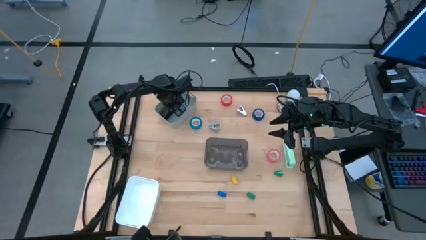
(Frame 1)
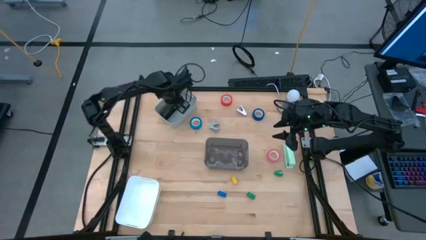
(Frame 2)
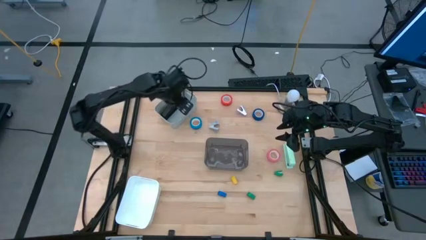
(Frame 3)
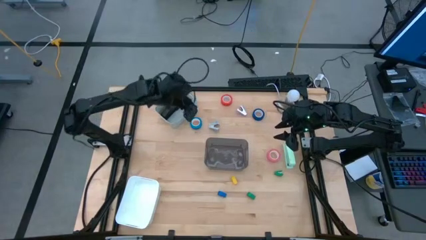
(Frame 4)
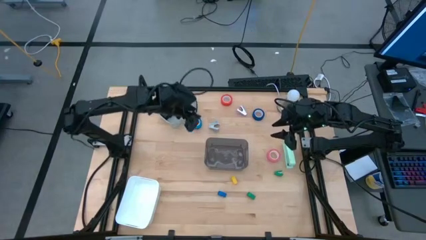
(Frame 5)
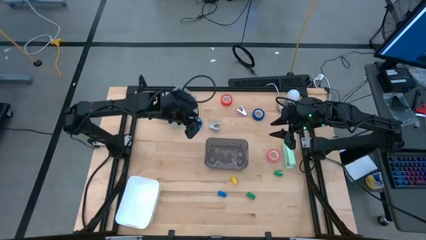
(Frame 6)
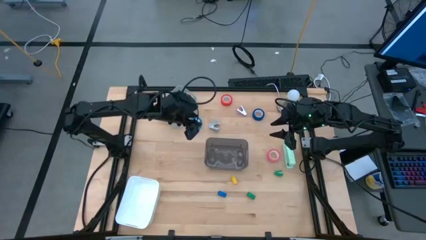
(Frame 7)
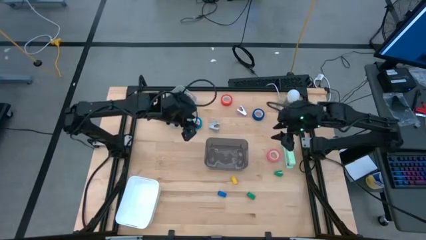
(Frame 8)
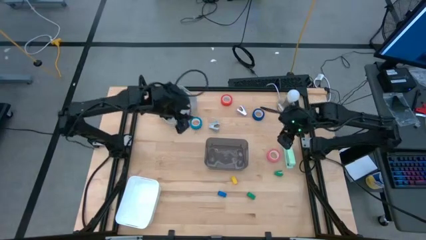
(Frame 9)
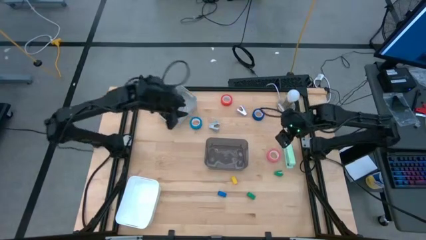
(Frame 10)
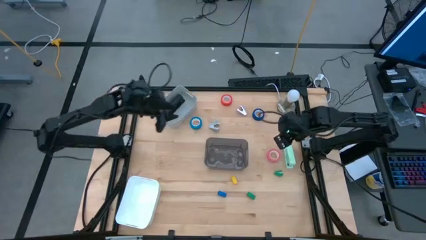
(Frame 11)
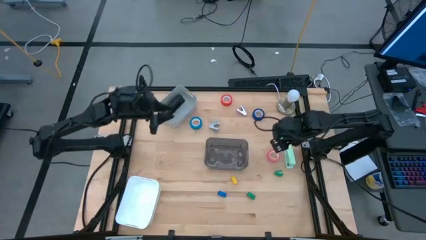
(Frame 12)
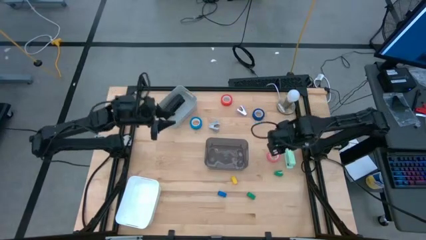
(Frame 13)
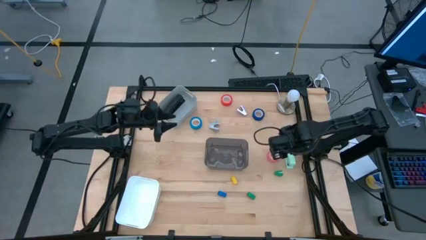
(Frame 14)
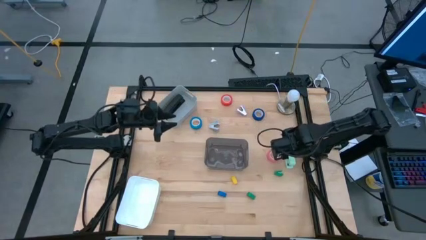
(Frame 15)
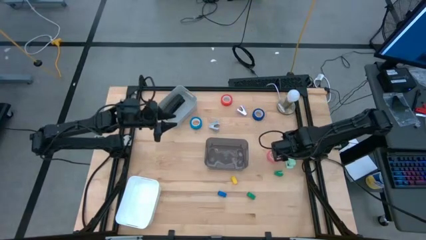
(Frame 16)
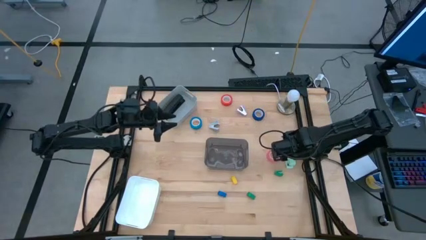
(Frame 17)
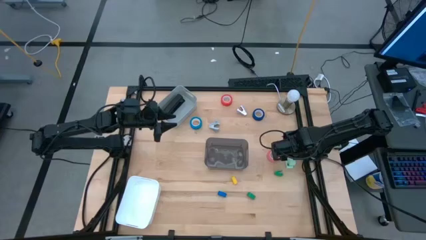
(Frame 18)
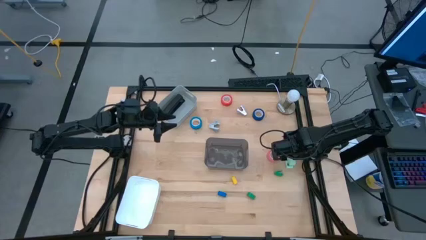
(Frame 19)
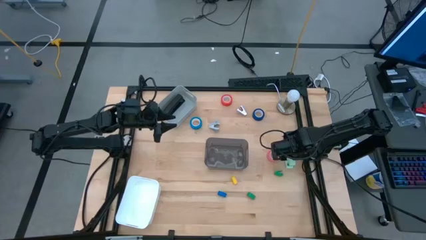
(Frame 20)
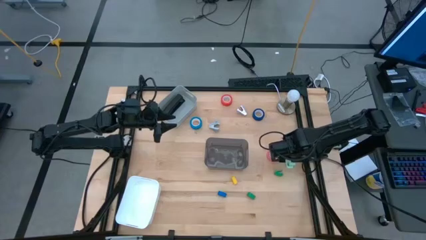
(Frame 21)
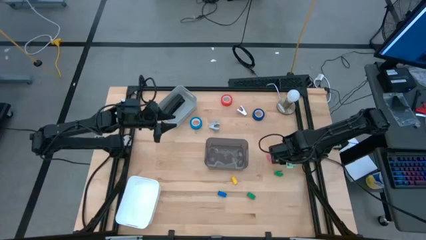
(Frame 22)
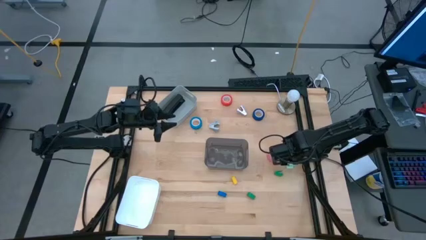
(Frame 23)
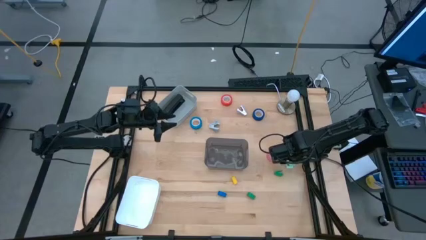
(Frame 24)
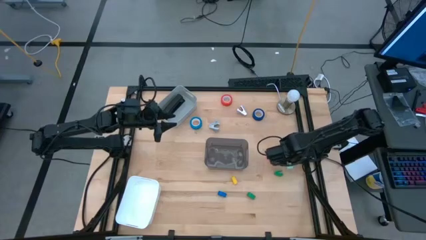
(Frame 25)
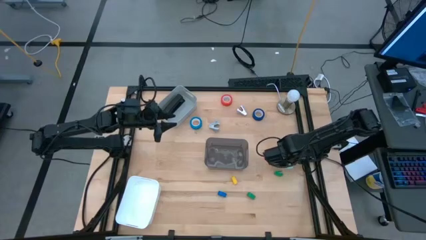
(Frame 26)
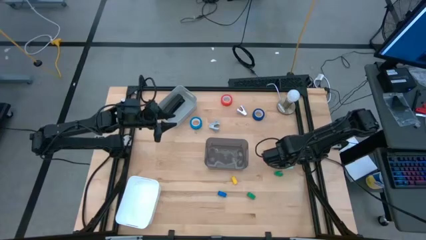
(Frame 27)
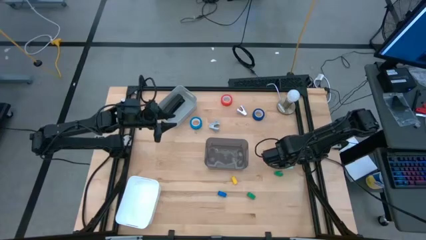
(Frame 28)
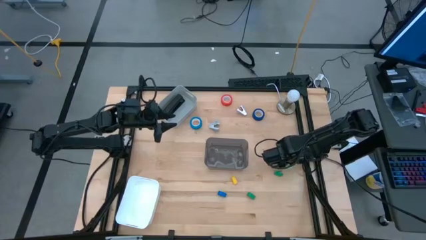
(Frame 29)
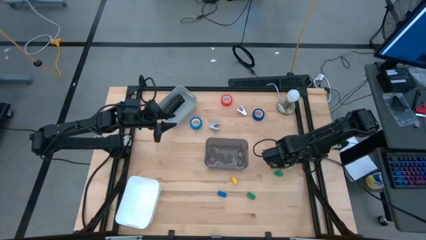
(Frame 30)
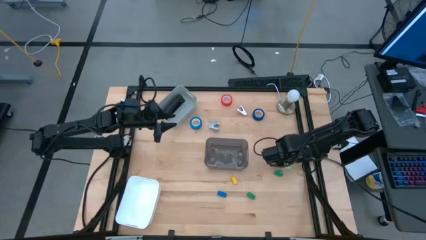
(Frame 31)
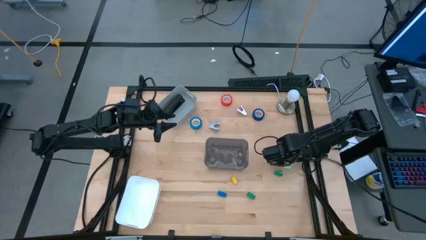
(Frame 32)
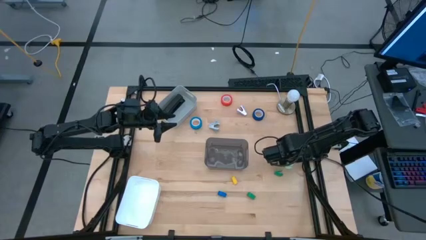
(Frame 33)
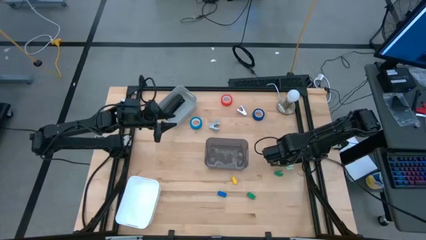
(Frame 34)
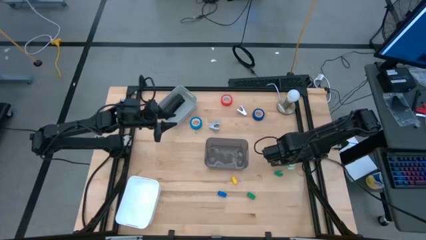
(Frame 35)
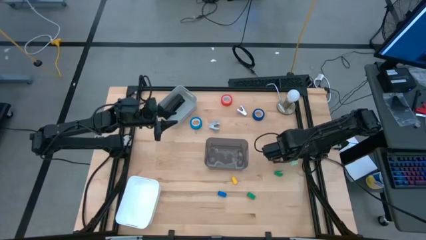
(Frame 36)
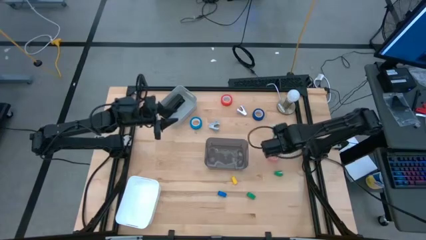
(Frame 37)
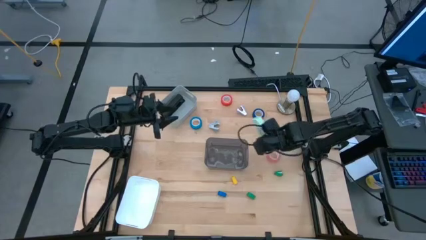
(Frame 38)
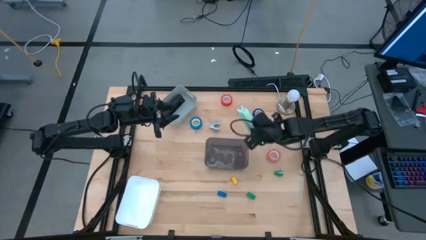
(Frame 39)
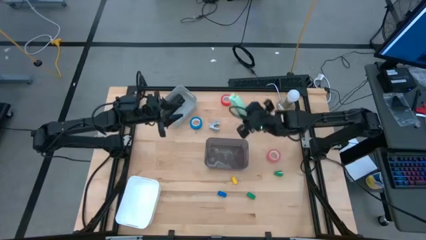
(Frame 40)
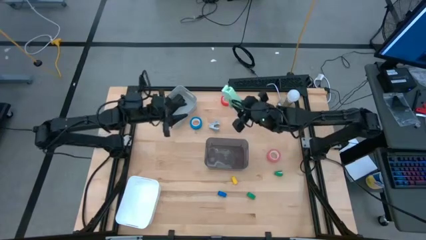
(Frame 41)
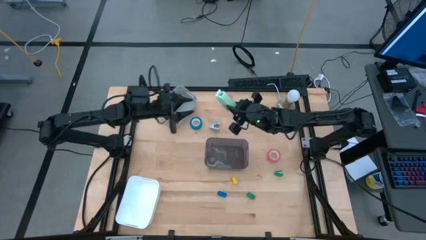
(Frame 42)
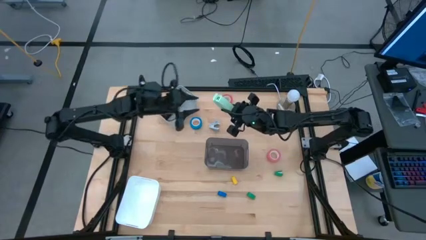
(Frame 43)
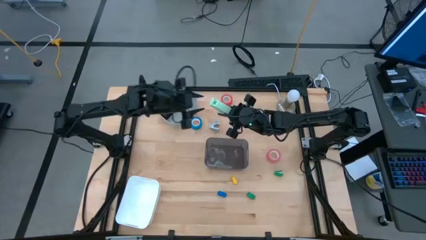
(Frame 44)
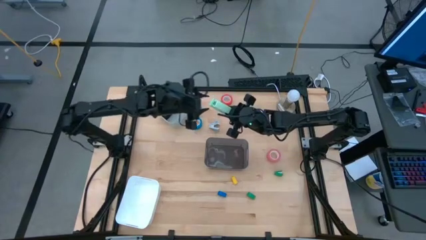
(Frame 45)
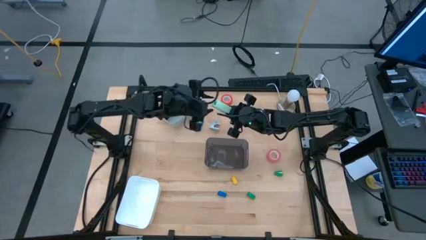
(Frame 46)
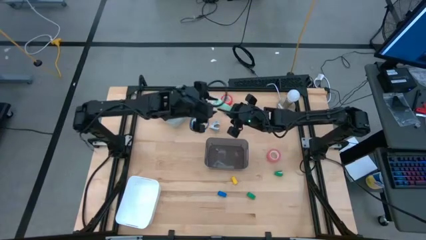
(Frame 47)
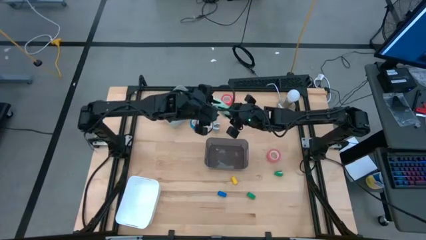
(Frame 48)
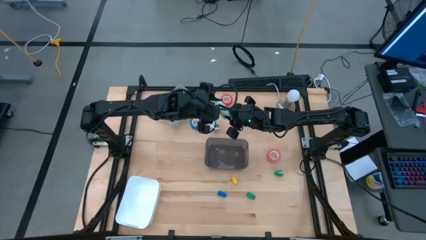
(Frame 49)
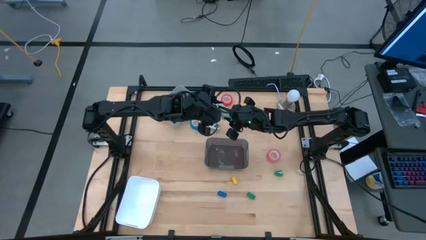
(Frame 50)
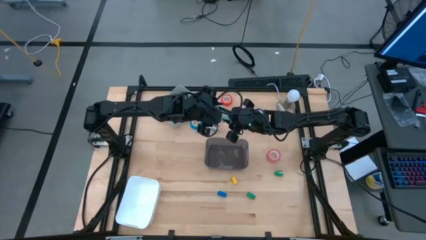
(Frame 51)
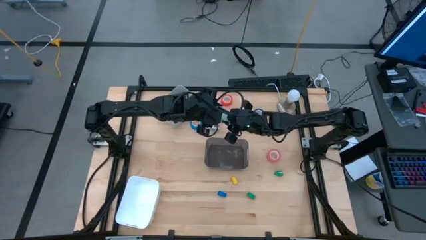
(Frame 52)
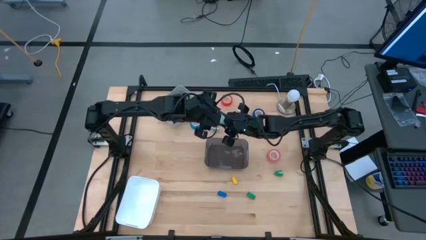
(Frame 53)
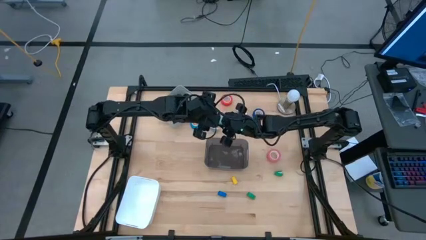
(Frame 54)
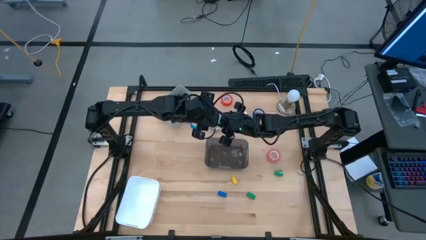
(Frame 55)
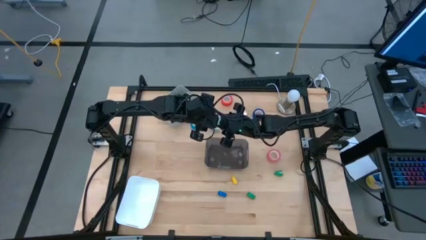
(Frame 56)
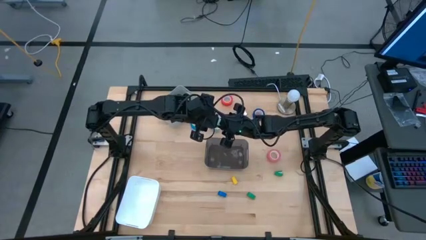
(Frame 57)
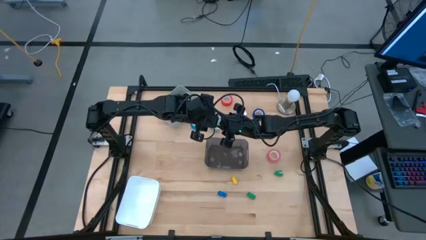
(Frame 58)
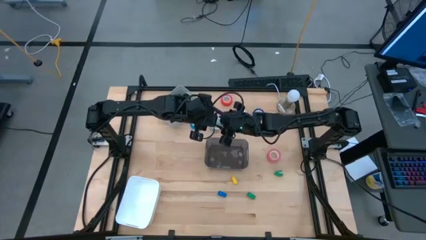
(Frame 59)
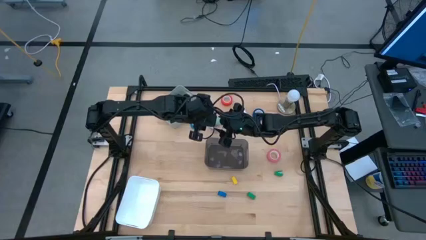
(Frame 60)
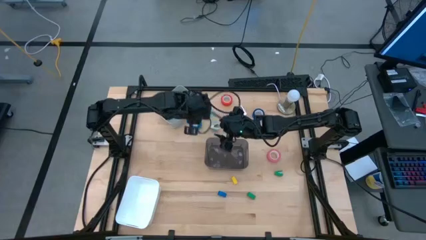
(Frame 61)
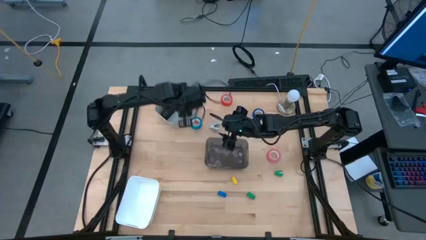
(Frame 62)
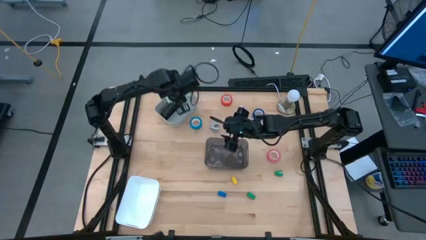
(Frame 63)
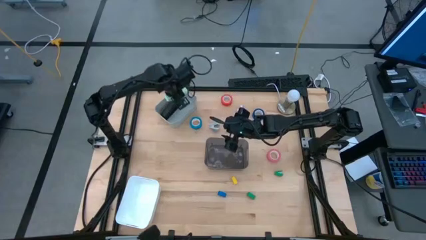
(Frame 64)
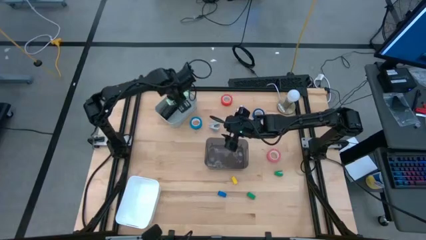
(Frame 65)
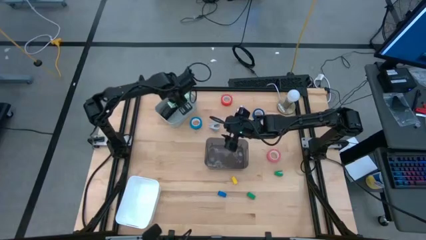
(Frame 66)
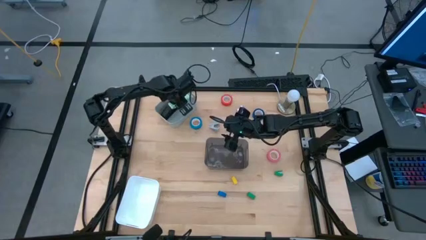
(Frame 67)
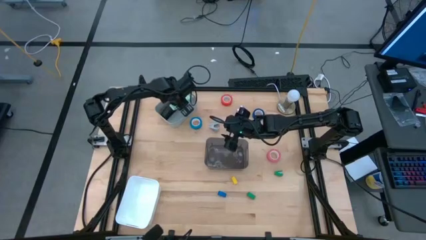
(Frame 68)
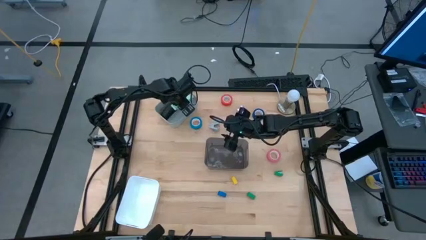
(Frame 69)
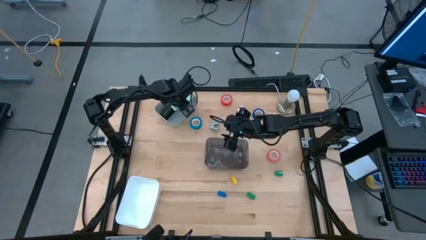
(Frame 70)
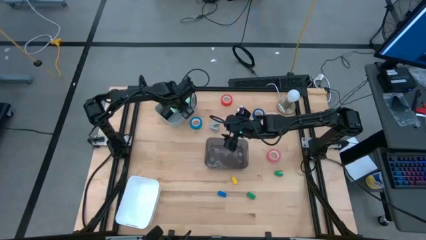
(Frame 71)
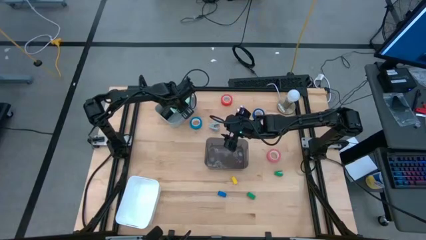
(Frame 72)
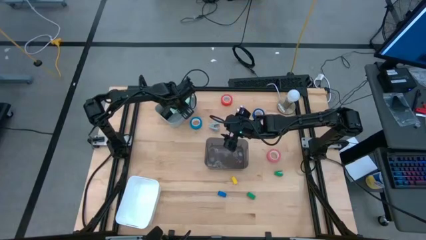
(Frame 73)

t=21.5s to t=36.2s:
Task: Pick and place Stapler, Stapler remover, tape
Put the large blue stapler into the gray bin
